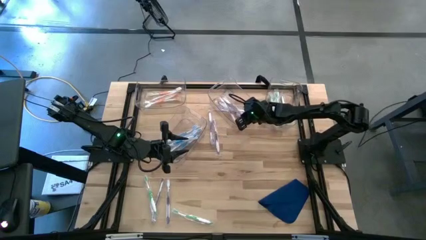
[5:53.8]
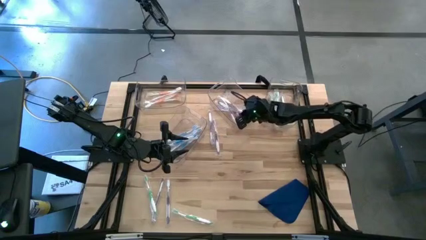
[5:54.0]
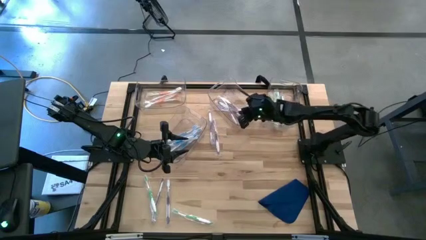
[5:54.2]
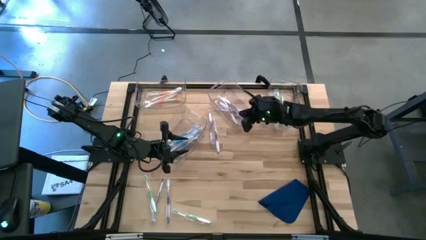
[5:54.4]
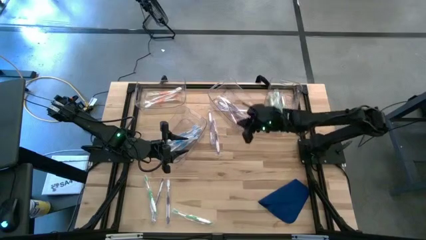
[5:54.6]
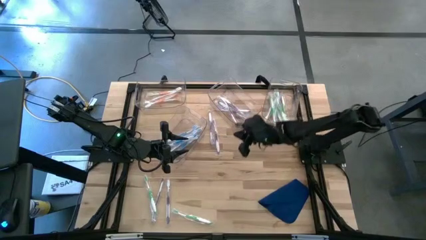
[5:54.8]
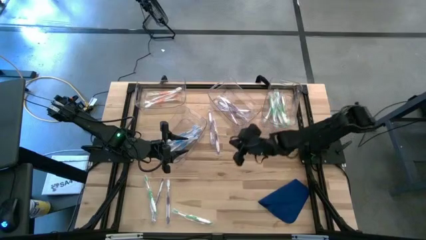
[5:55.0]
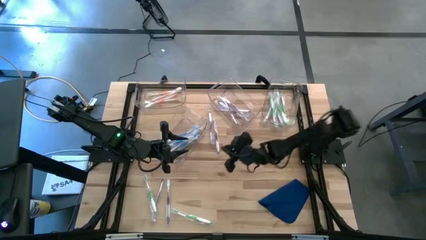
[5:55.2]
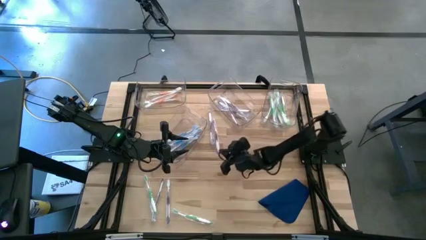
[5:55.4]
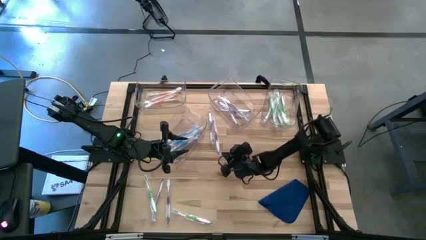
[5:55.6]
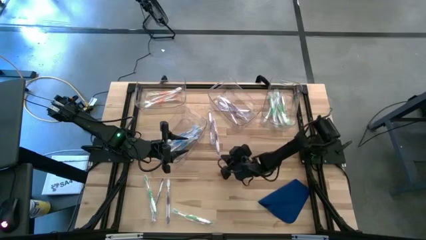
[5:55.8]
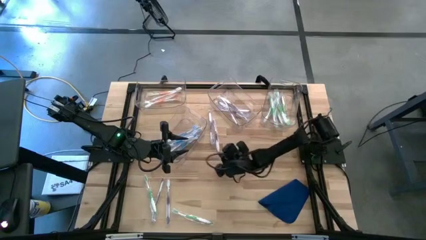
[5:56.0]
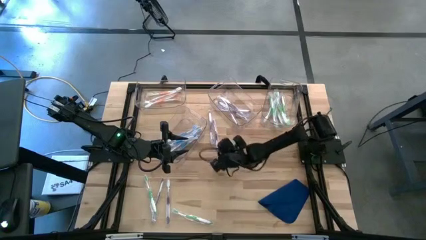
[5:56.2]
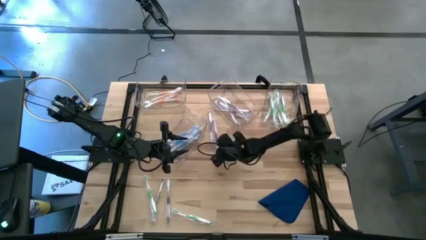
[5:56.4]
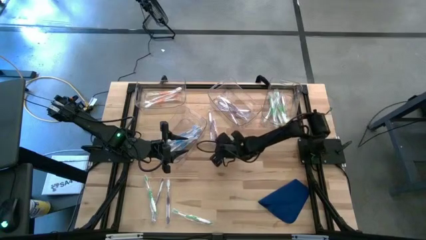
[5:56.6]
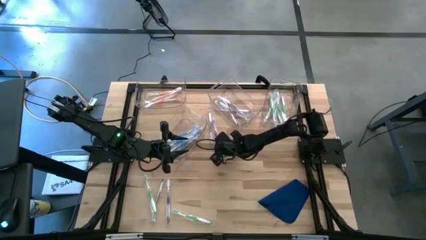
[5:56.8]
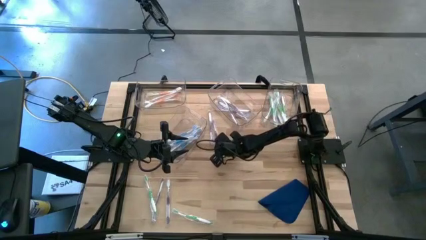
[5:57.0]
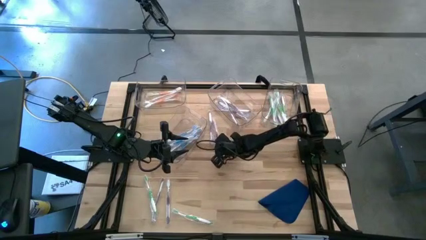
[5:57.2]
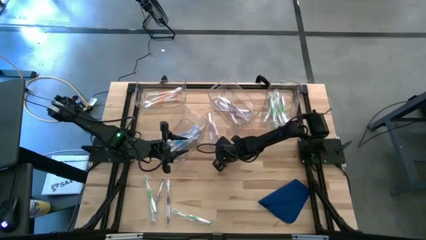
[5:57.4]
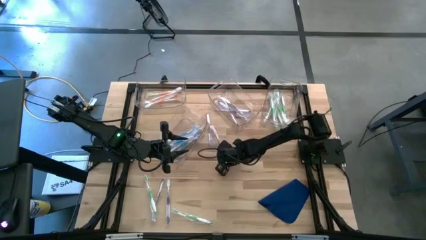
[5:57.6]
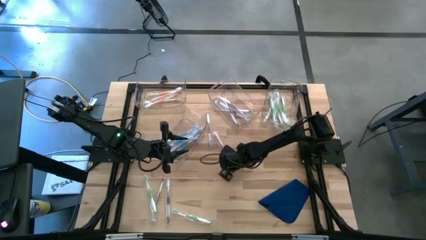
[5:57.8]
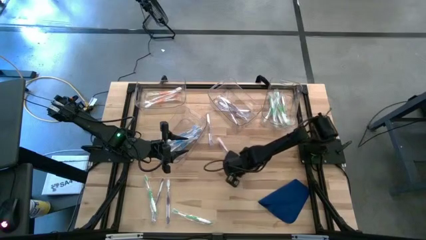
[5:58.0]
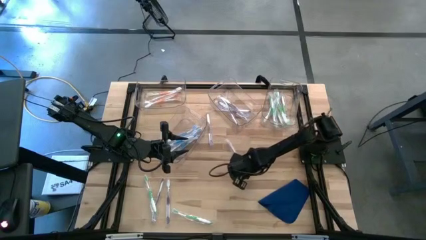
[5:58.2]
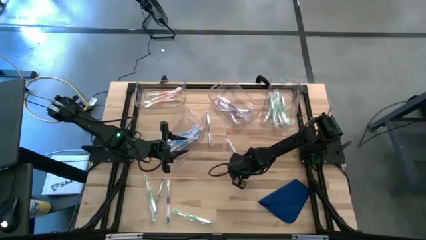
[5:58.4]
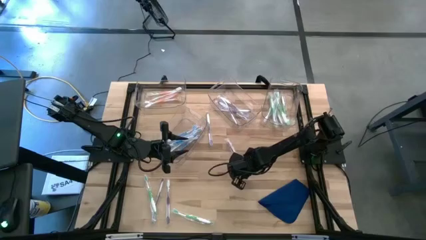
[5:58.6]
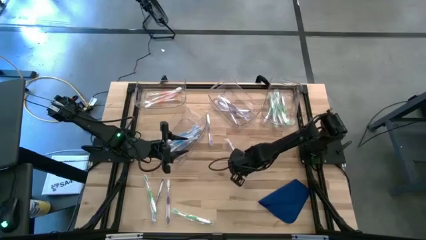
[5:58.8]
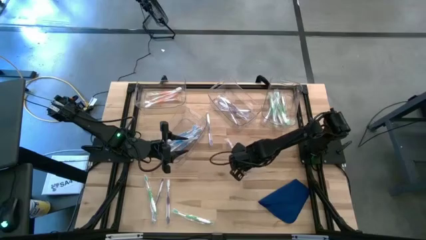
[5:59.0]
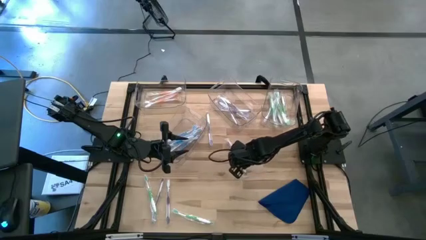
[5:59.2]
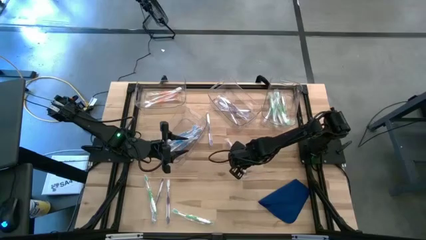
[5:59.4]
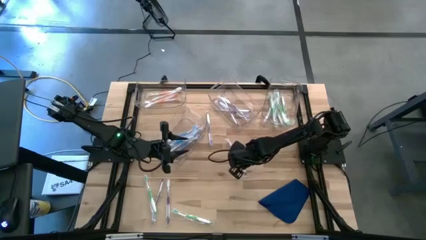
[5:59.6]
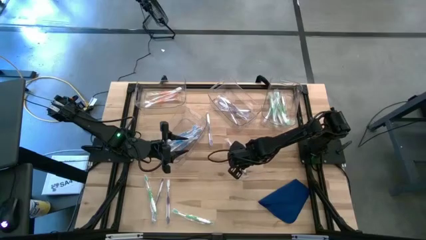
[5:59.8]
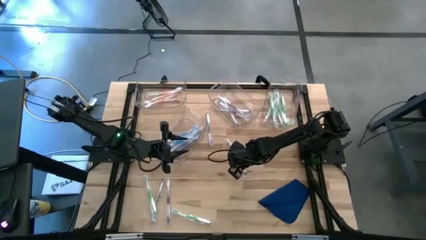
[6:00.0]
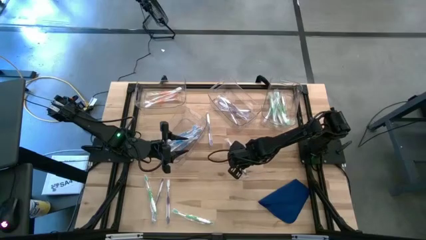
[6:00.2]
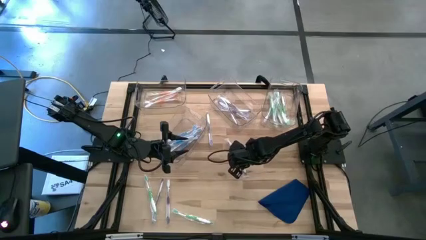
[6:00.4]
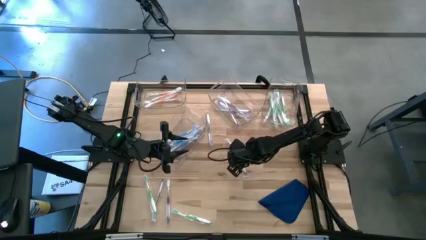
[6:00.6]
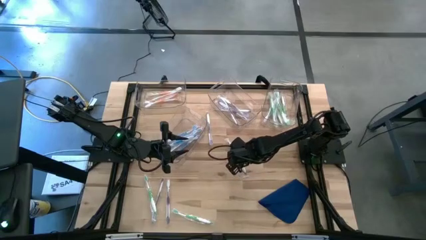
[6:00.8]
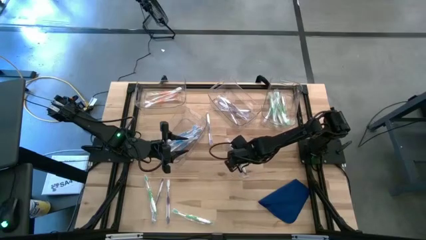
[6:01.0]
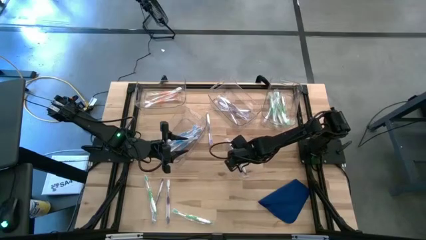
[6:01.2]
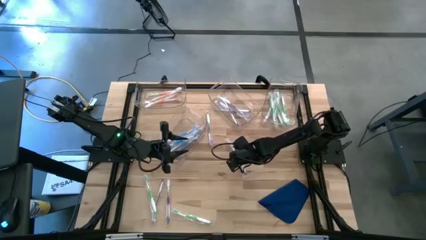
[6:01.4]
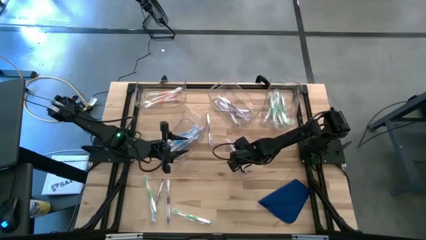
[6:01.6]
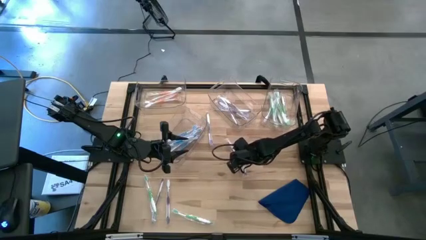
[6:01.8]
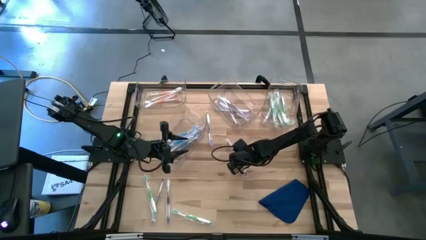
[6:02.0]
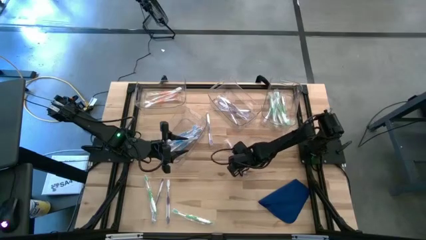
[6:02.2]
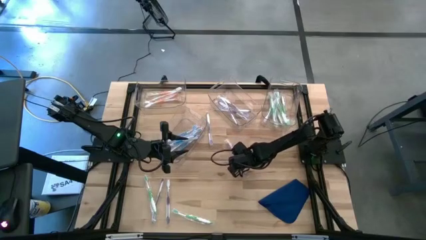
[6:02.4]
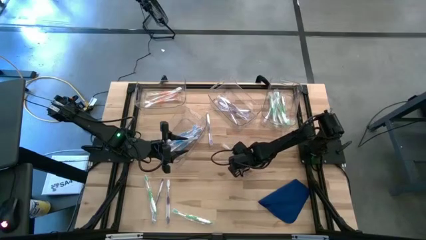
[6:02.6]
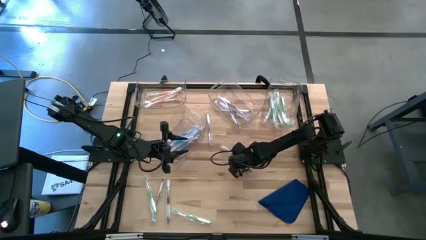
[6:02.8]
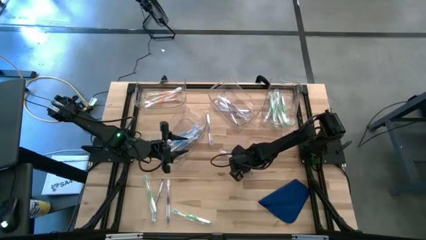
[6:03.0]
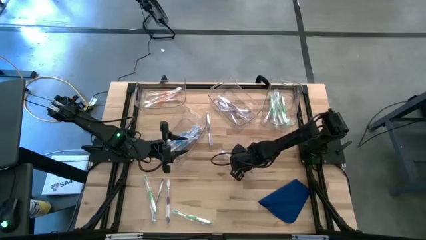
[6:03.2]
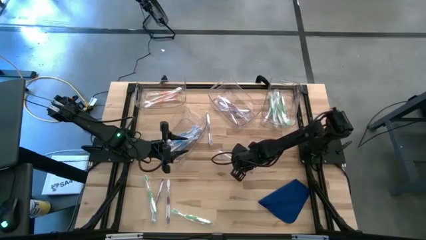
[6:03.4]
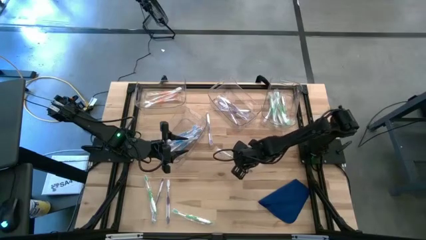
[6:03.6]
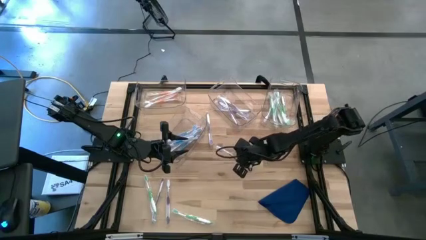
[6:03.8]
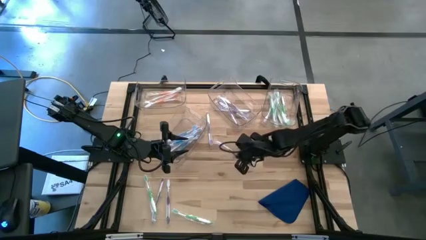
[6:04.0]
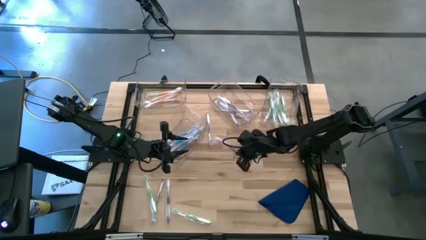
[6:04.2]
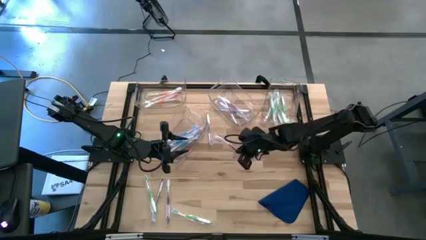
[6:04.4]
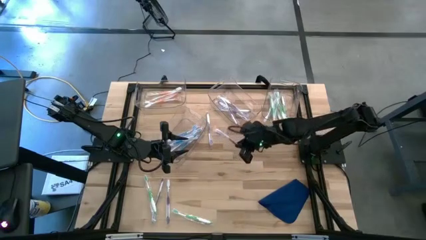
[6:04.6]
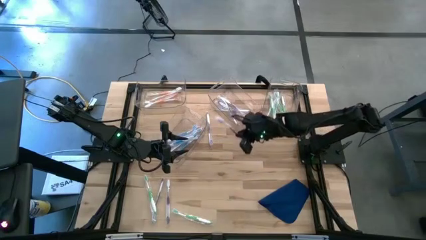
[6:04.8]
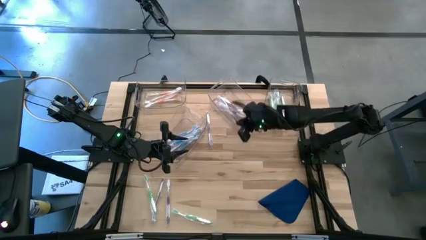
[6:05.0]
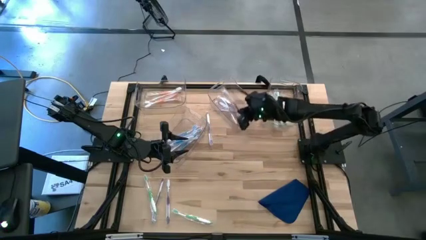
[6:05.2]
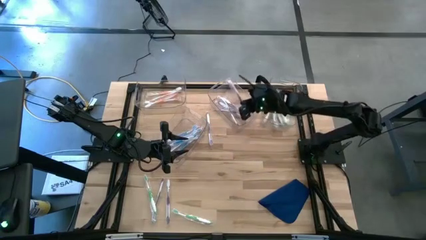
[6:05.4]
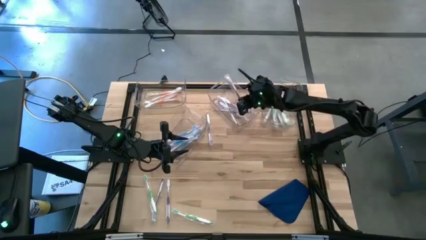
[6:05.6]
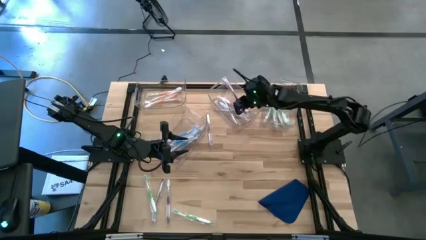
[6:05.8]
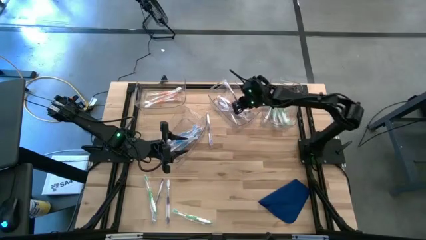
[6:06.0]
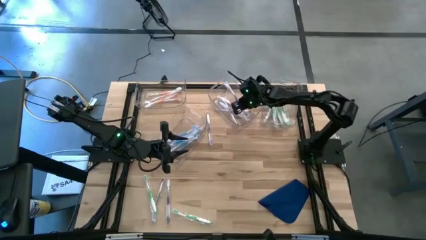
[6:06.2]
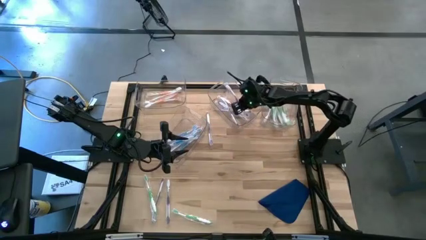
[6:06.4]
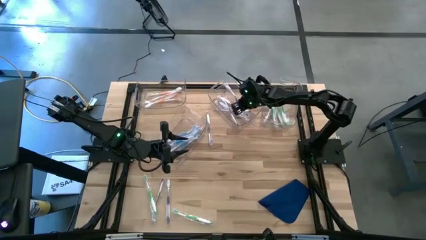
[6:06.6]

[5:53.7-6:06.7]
Task: Pick & Place Toothbrushes
Put the purple toothbrush into the top center transparent bin
